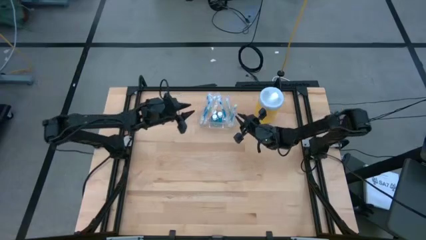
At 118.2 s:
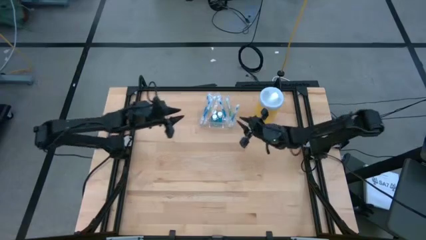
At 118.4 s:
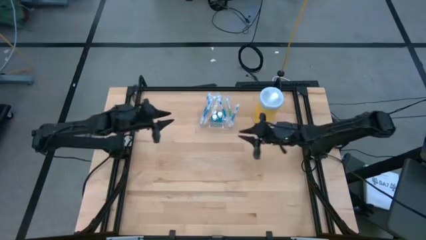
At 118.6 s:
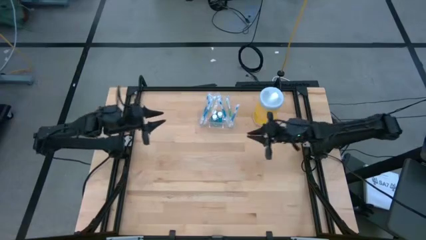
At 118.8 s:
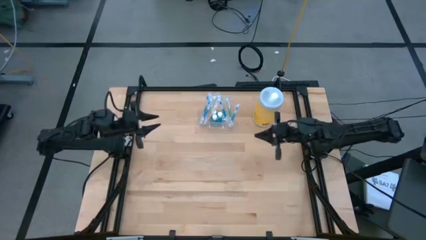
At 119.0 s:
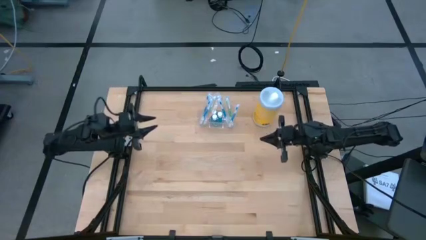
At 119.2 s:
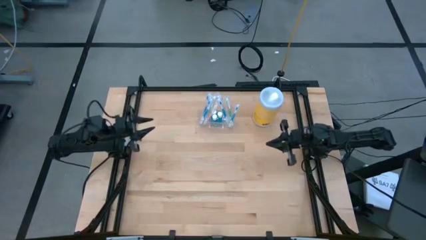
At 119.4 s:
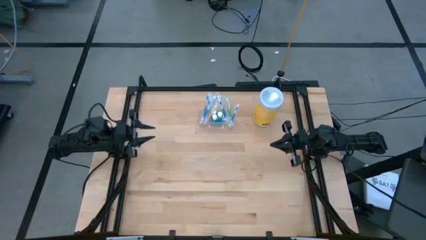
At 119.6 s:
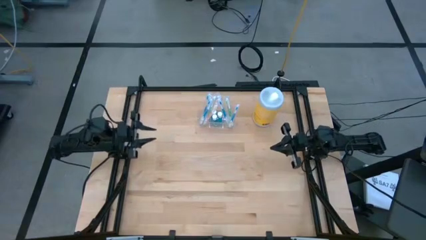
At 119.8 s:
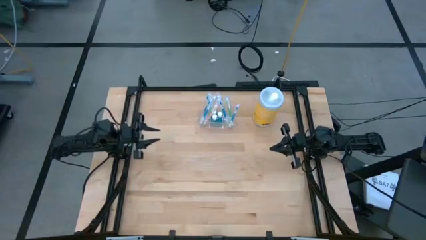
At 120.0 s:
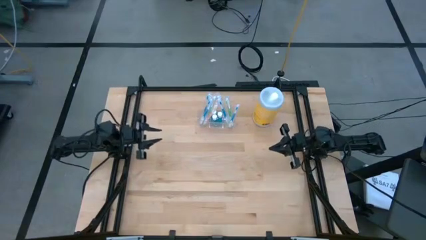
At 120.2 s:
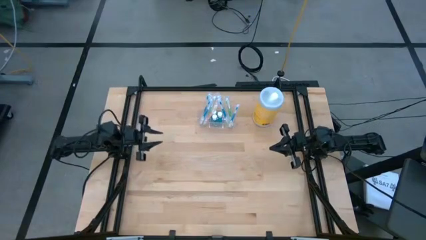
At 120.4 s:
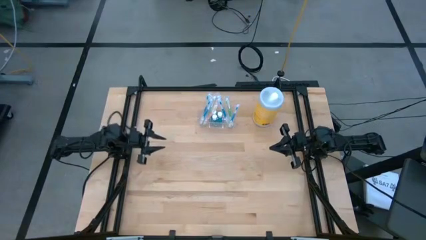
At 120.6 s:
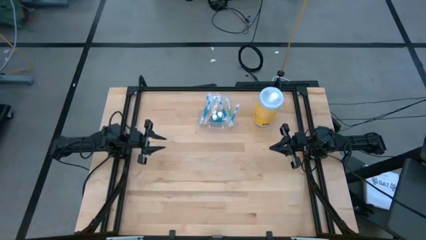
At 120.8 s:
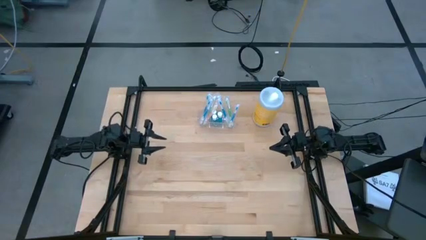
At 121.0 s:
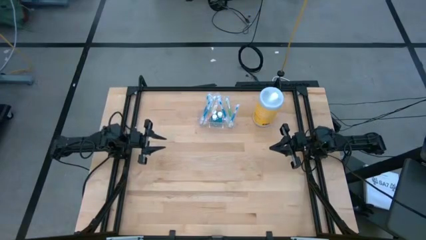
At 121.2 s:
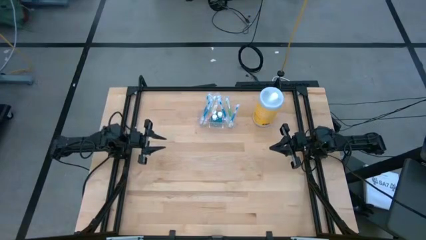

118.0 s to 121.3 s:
Task: Pick & Place toothbrushing station
Return to Home Position

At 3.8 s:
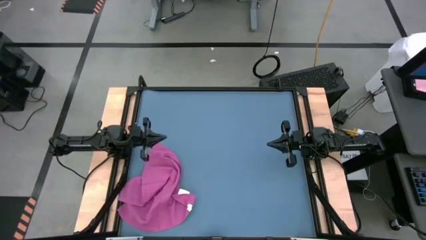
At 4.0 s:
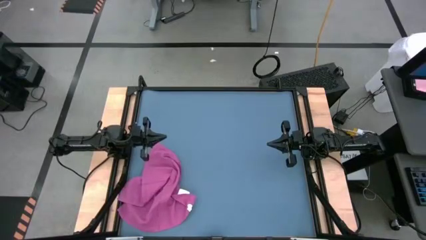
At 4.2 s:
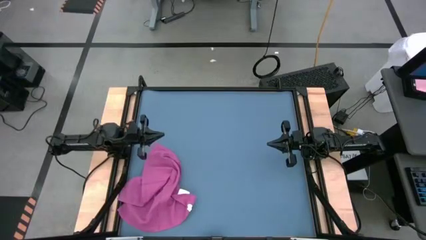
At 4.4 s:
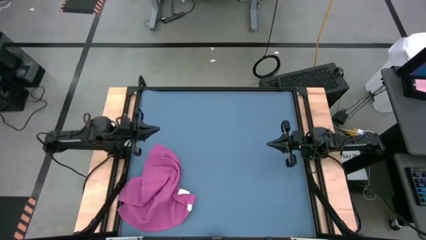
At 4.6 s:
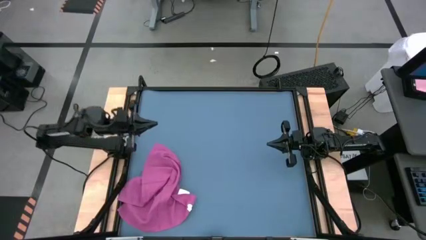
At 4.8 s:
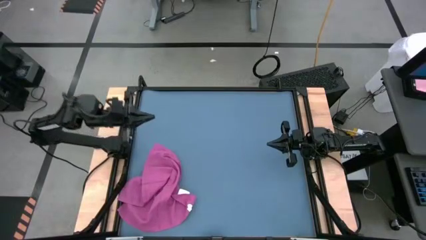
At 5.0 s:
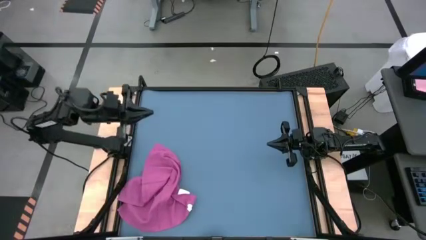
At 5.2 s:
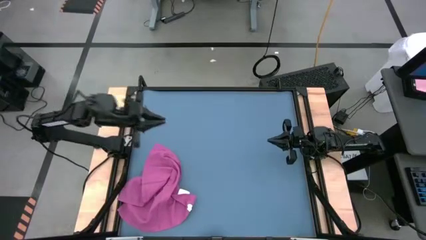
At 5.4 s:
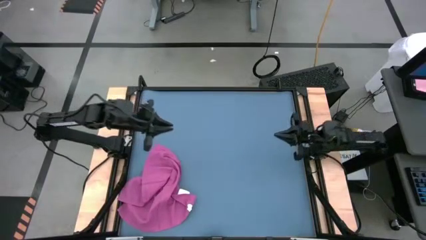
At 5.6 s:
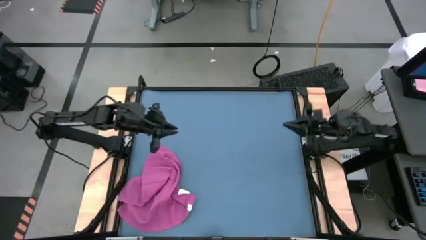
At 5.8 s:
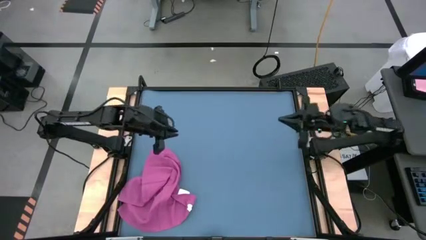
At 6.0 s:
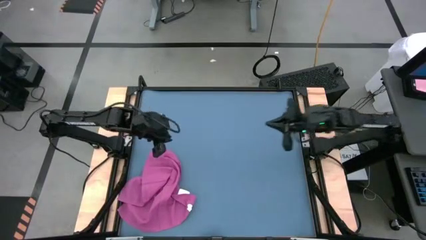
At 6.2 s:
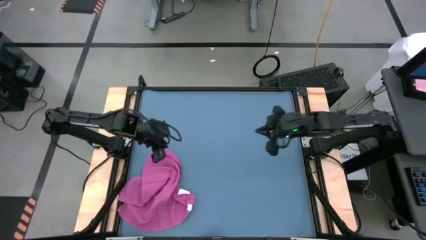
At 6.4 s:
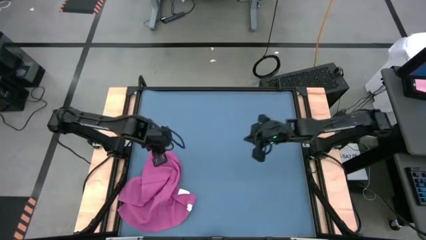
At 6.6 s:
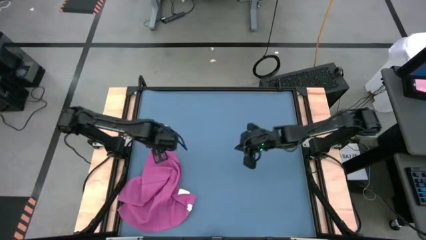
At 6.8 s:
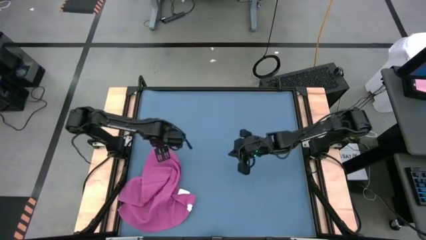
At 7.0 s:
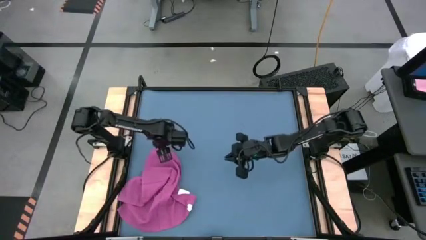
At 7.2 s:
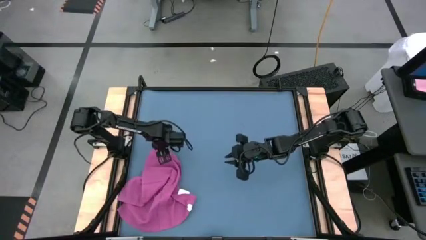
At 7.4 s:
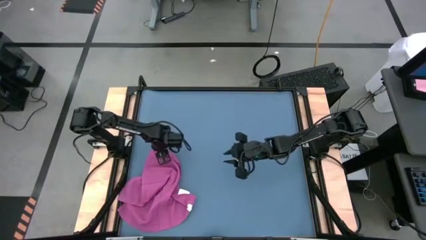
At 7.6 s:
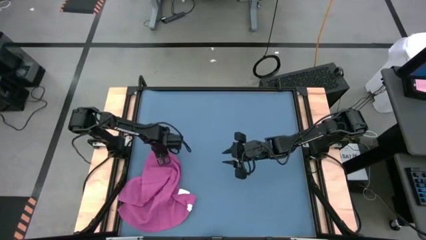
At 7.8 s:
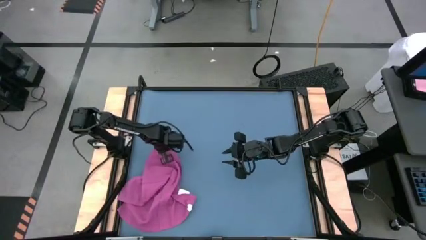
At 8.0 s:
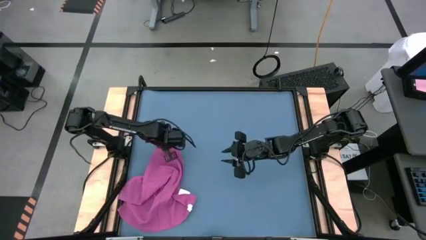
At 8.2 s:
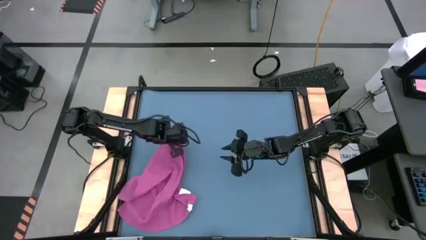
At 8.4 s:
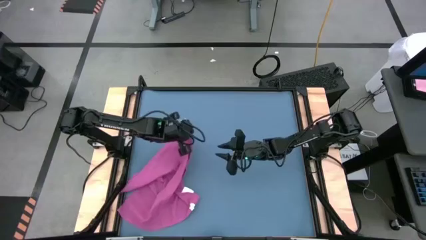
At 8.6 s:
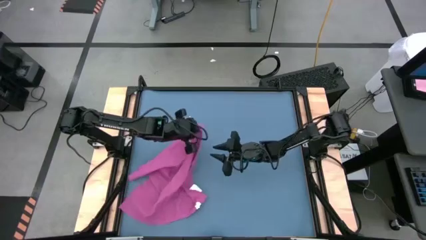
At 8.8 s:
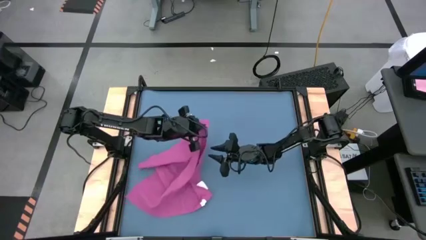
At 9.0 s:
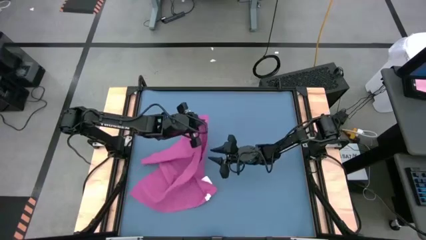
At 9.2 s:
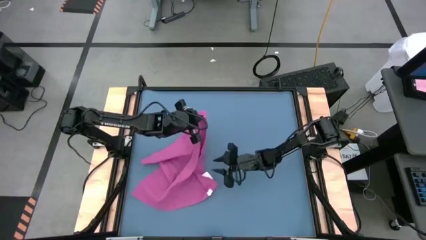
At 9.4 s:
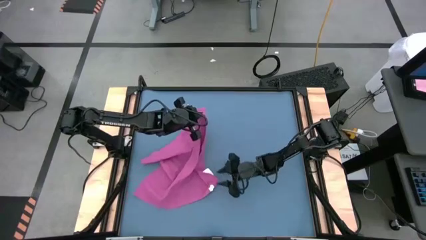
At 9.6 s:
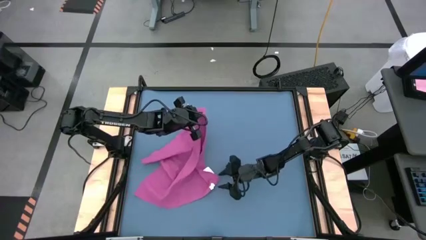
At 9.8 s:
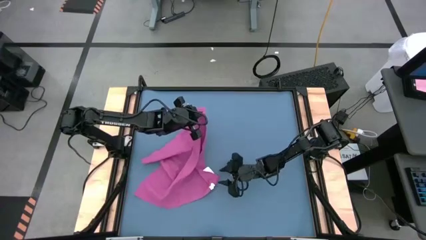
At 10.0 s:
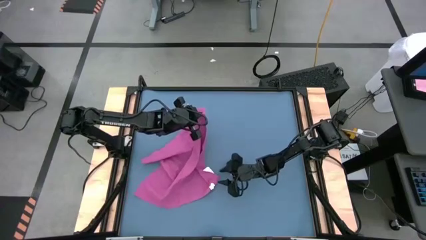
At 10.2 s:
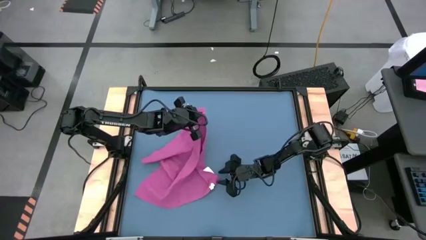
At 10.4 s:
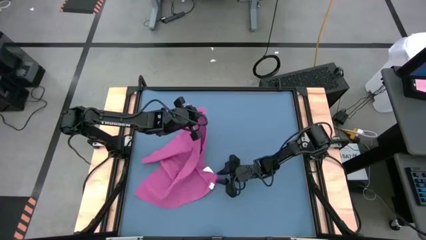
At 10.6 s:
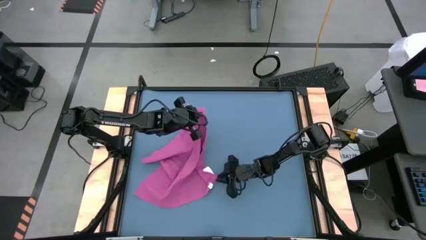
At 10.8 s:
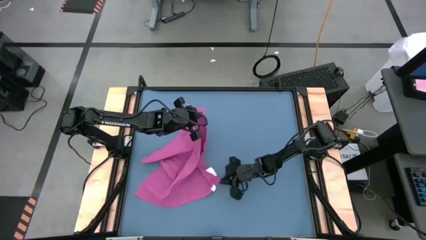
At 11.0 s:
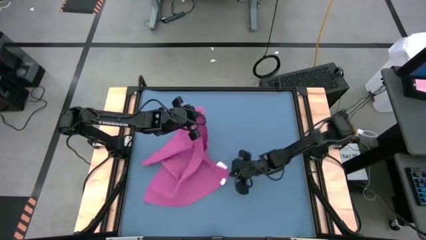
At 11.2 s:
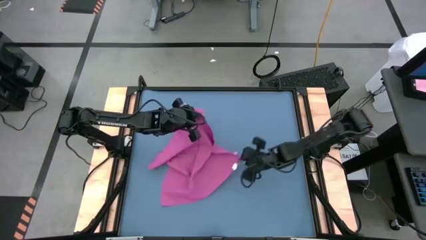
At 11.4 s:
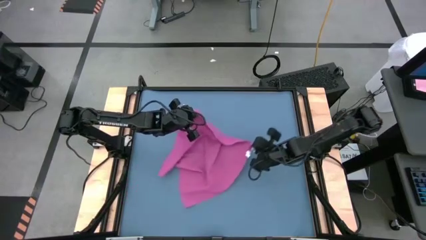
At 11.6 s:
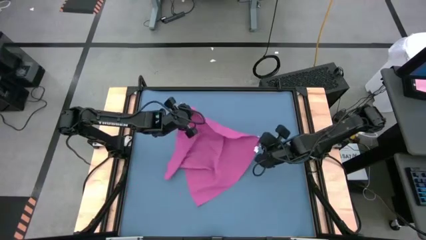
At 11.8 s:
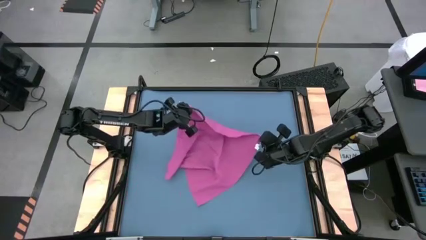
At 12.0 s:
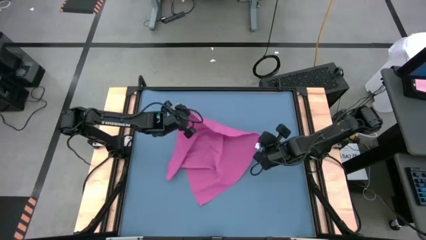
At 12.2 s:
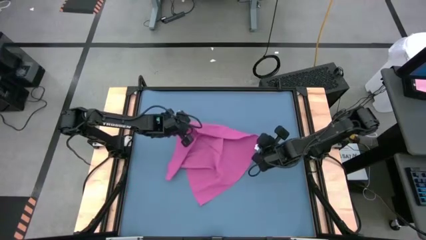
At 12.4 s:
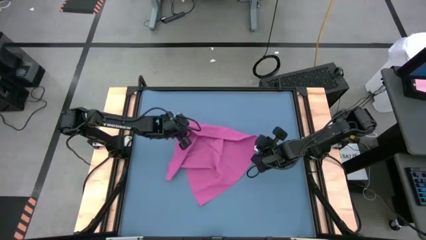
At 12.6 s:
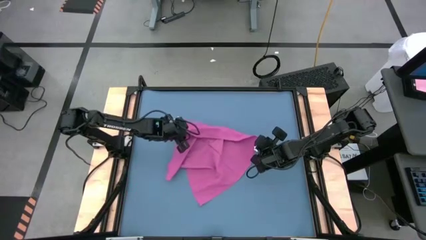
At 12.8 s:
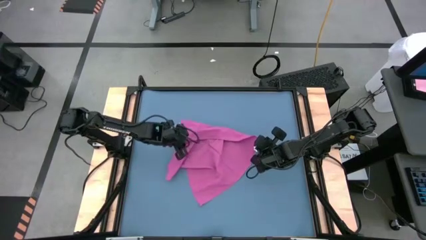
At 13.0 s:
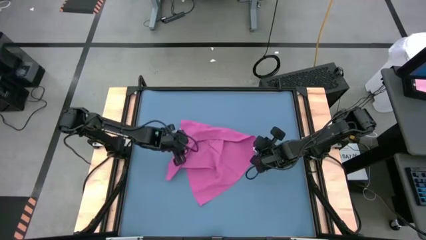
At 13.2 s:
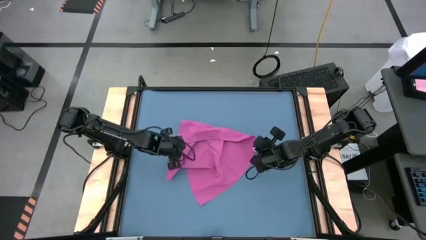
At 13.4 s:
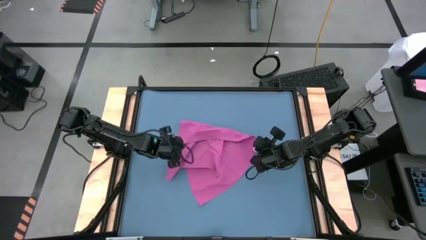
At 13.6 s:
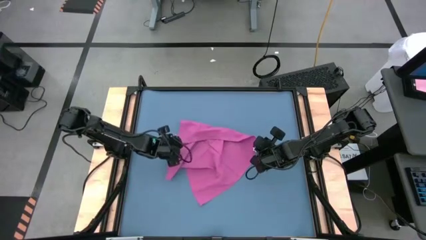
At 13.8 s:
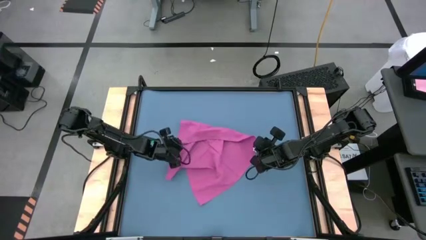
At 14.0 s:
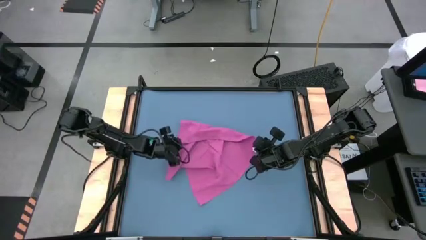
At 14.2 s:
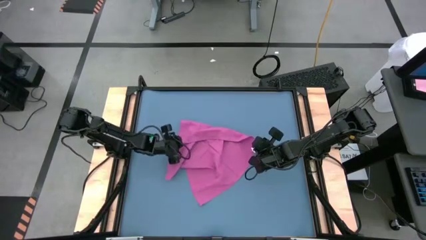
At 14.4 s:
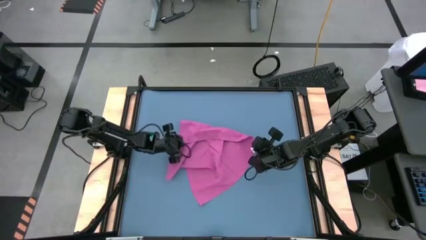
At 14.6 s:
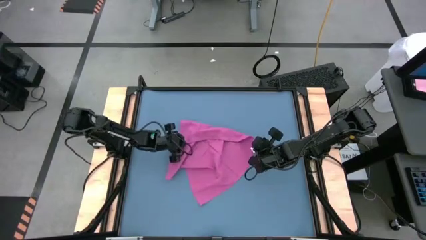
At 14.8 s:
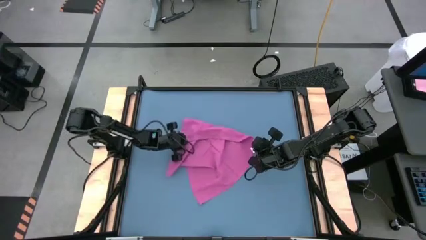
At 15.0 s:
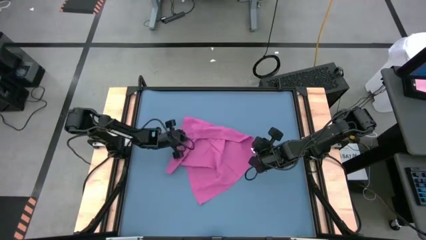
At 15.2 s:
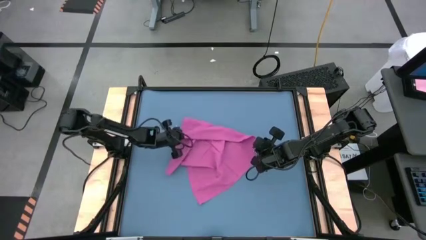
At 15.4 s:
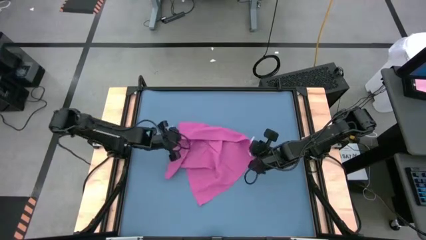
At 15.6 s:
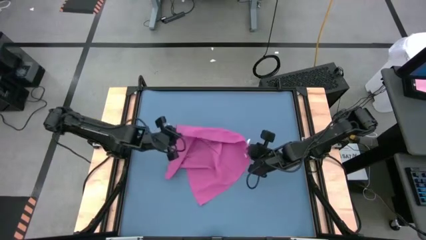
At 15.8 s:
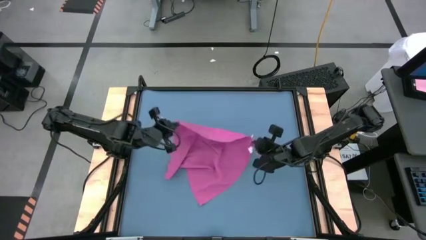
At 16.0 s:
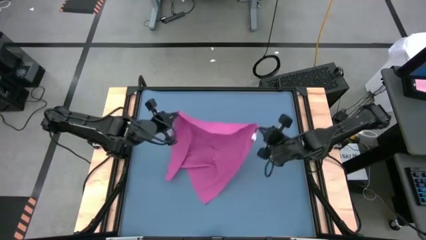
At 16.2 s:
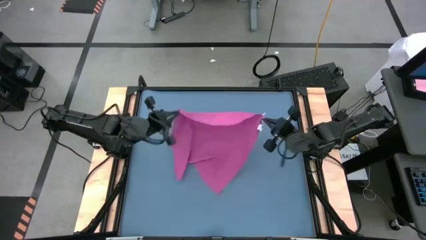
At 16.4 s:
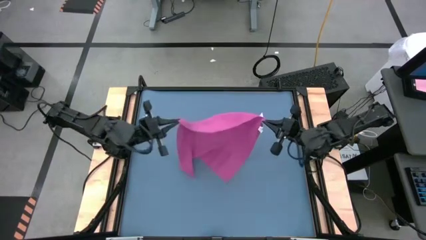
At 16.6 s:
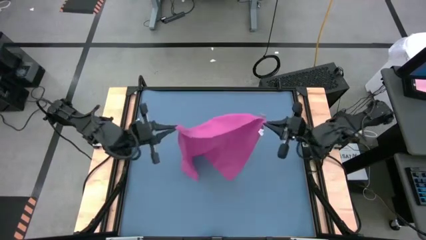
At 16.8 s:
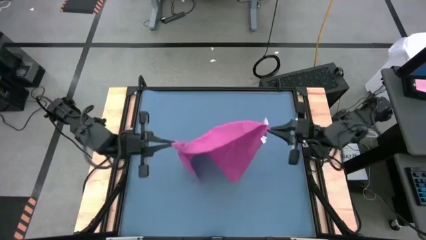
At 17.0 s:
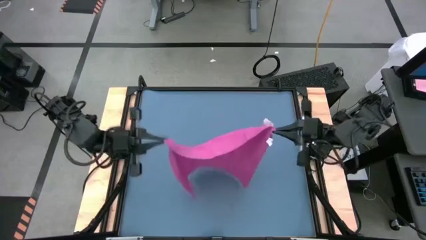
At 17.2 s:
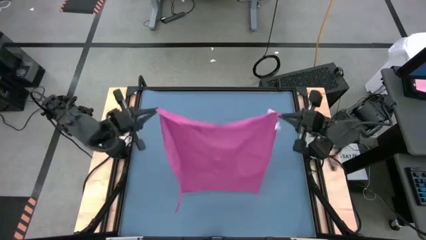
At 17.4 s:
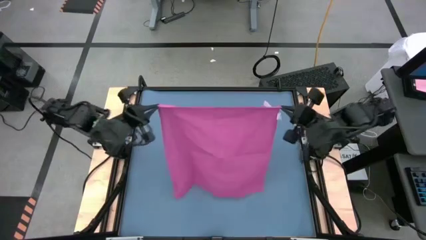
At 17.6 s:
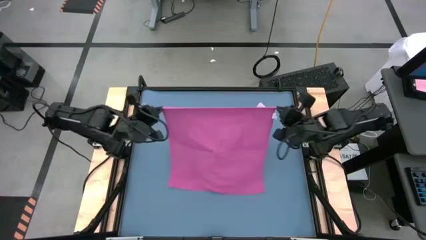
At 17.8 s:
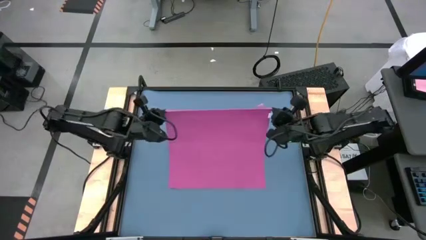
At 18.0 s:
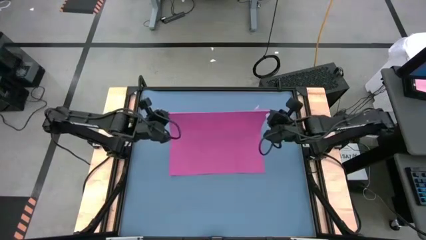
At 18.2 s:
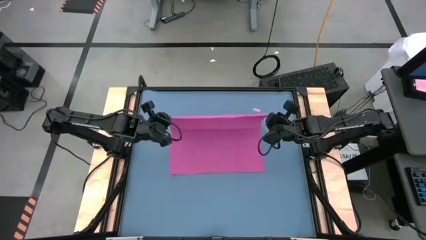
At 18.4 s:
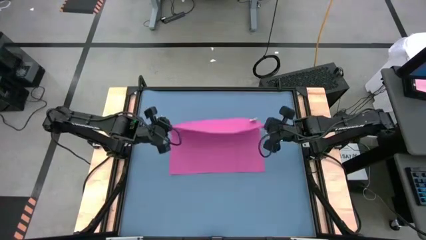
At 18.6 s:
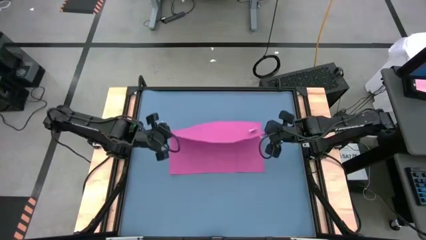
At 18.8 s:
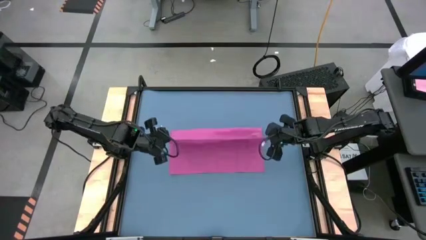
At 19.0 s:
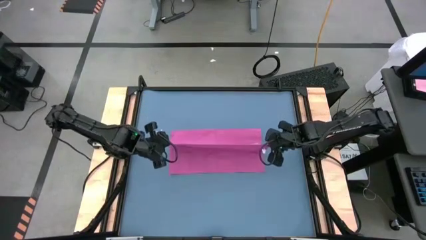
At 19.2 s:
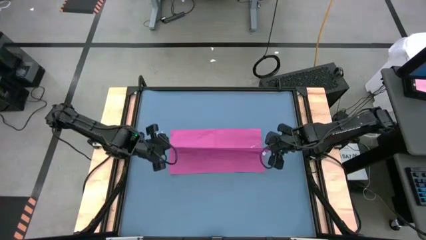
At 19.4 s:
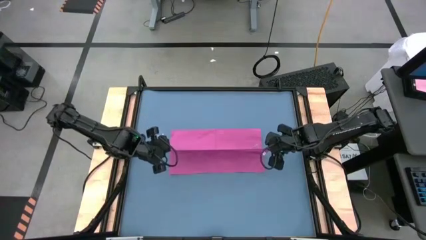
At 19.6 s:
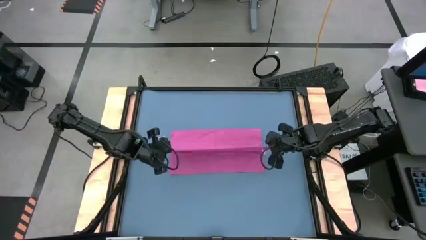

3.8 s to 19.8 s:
Task: Roll towel
Fold the light red towel
